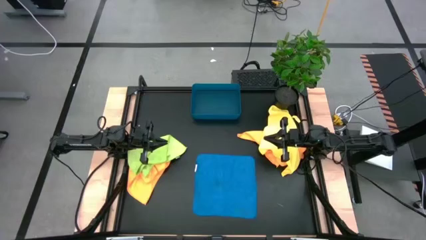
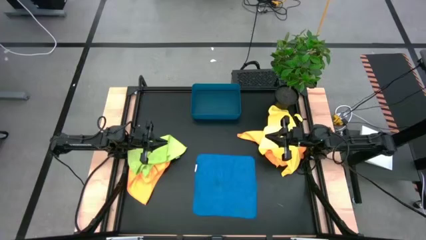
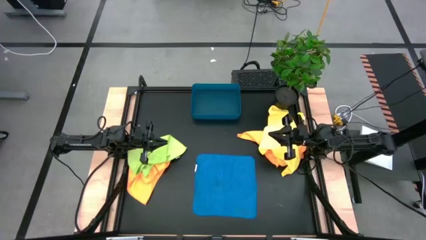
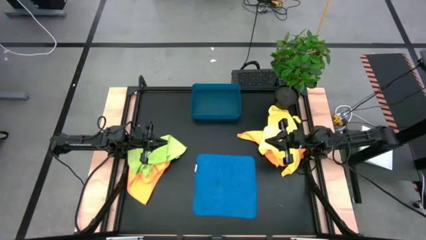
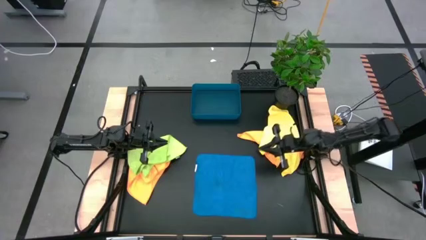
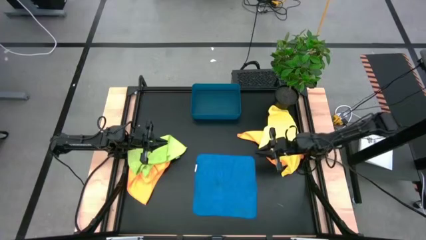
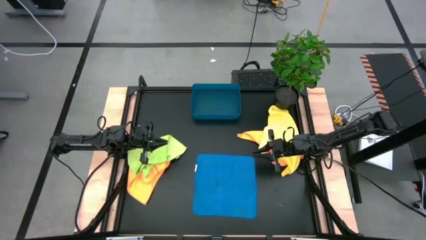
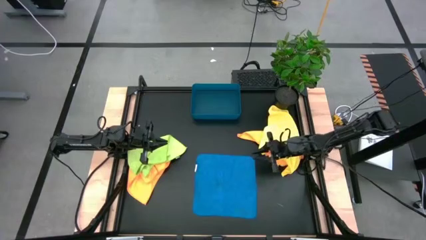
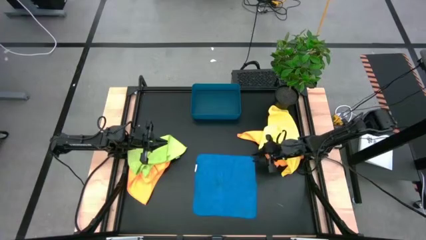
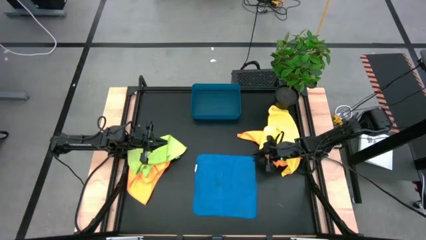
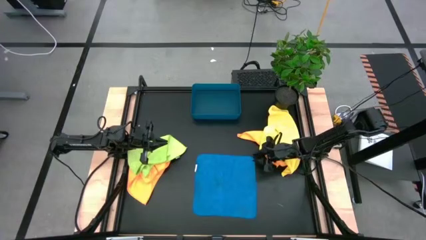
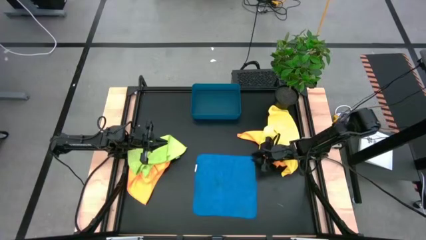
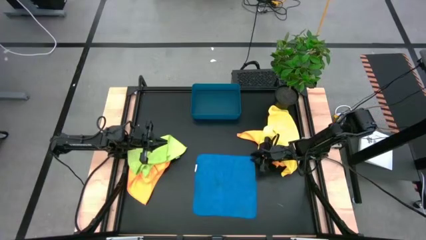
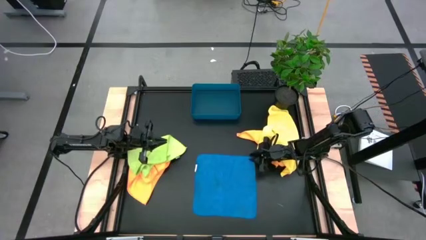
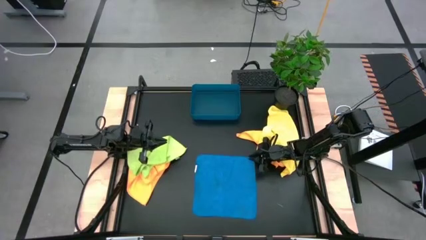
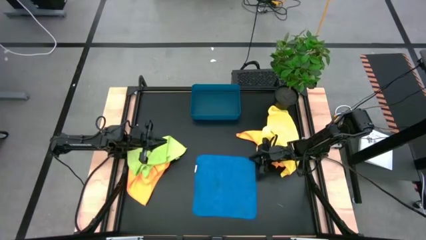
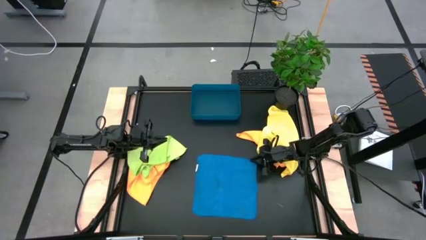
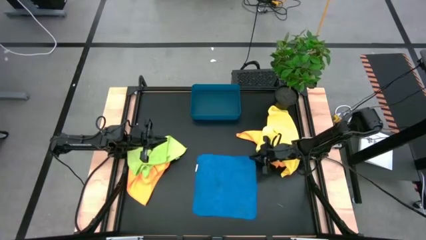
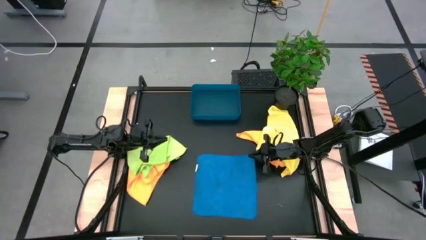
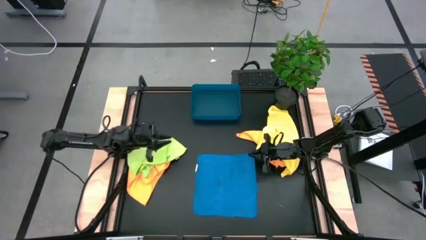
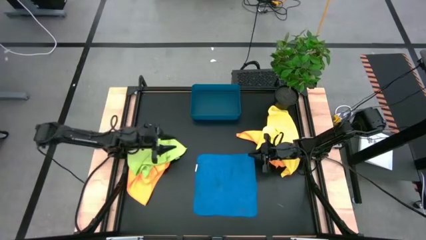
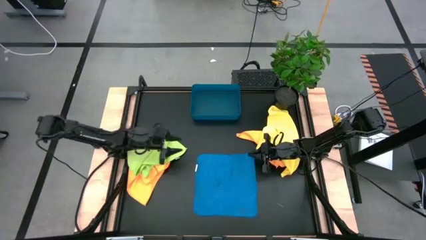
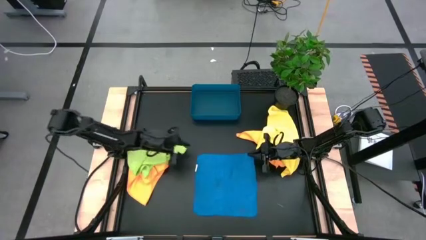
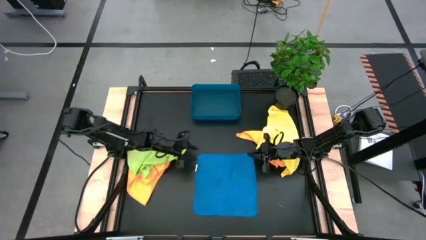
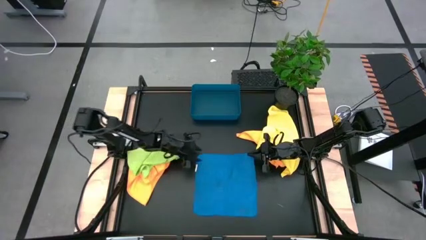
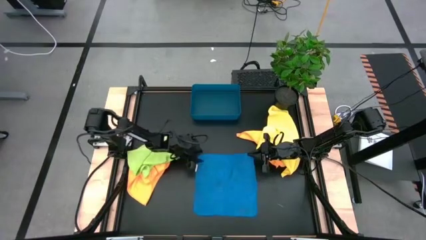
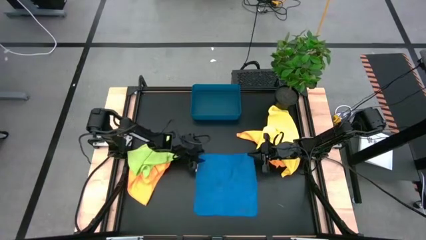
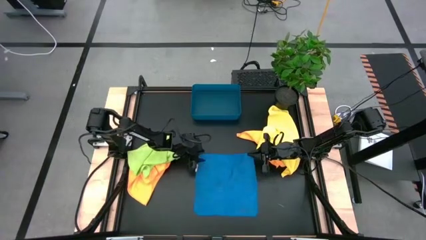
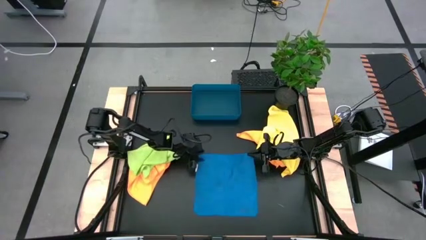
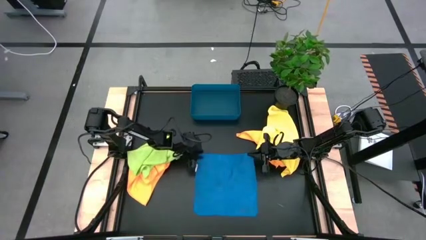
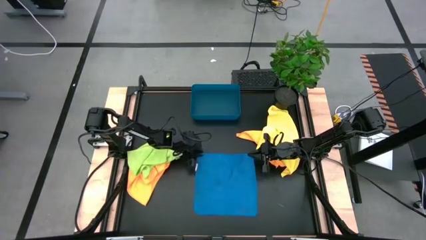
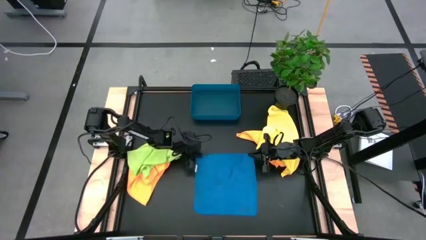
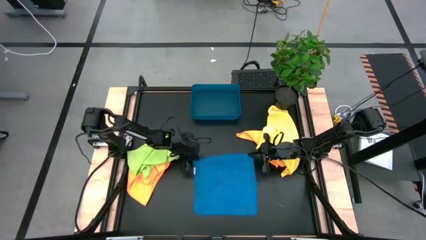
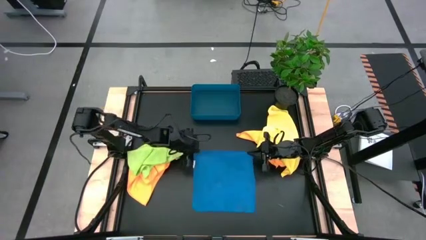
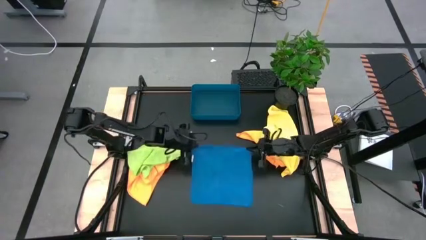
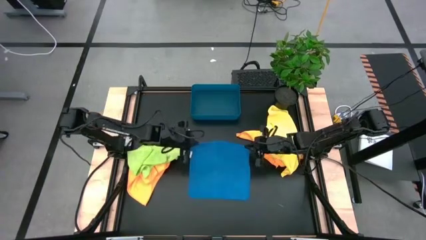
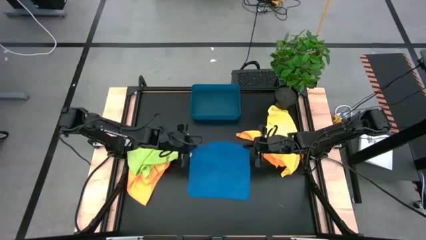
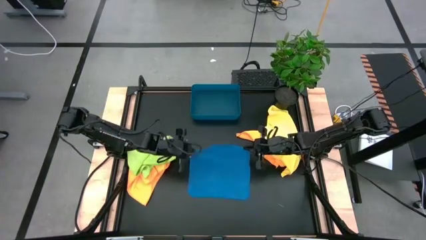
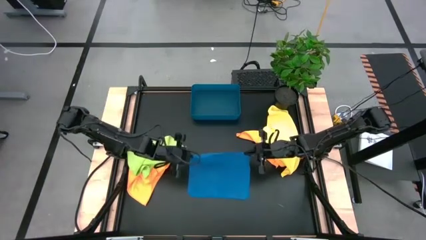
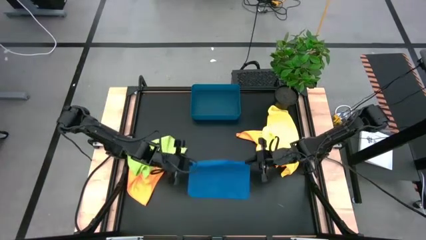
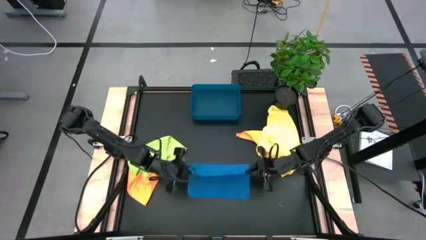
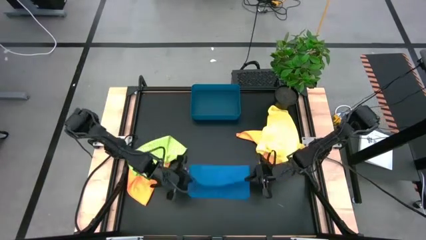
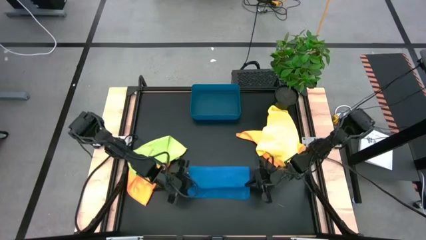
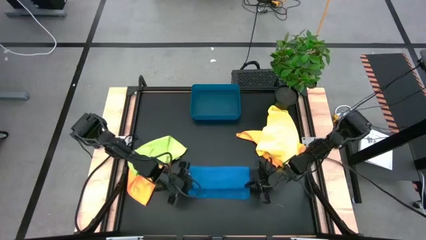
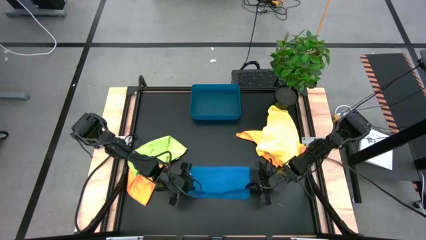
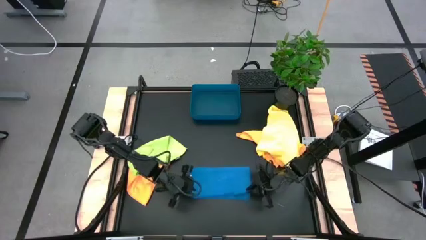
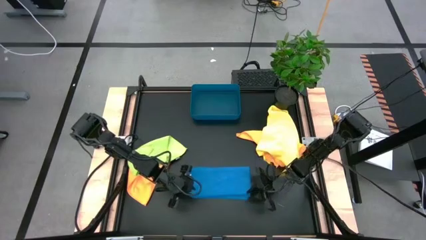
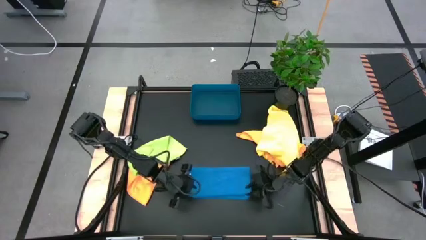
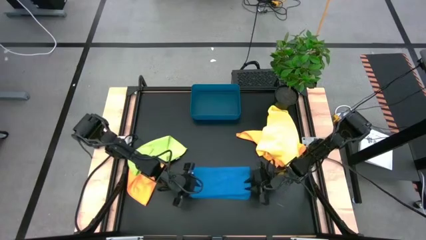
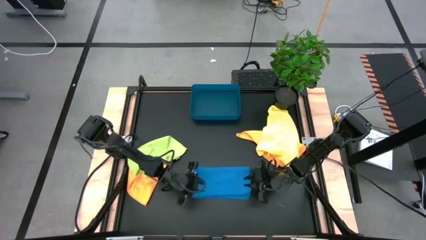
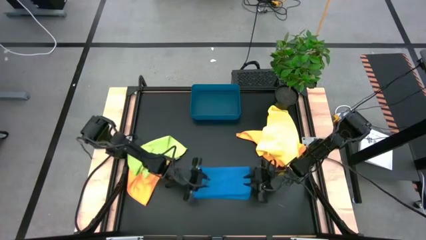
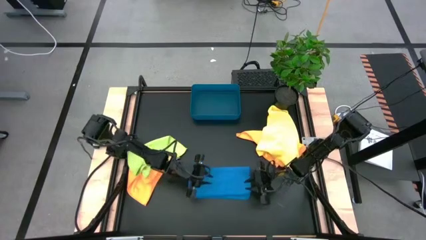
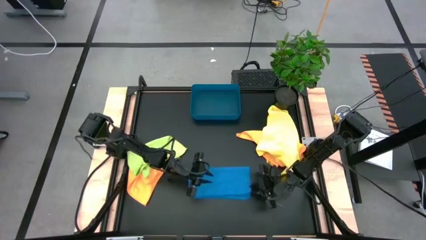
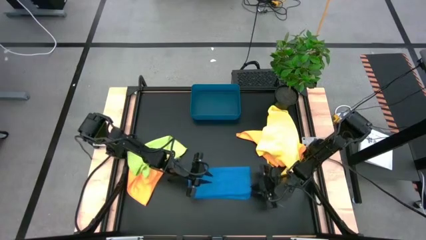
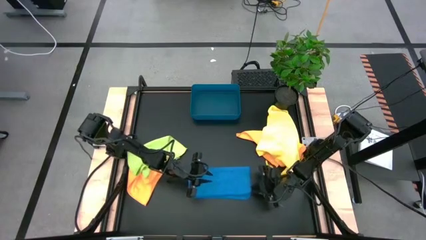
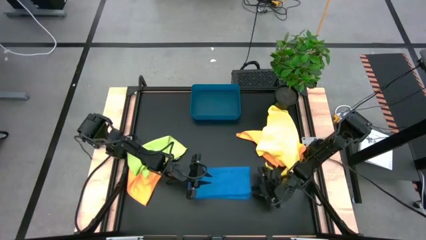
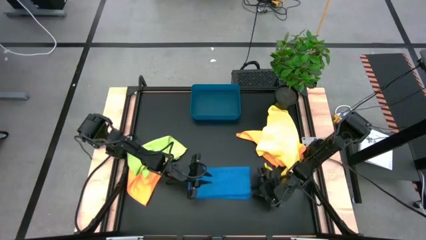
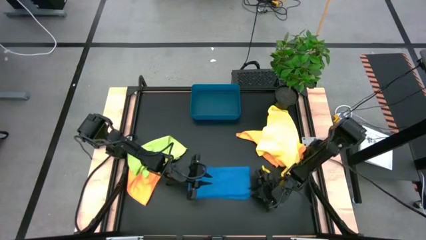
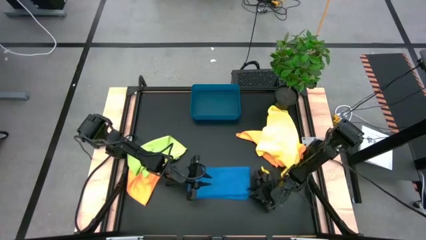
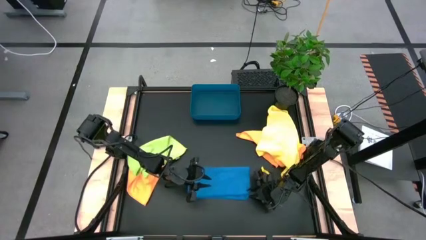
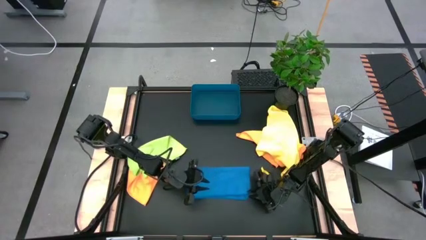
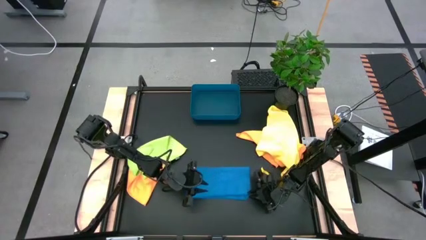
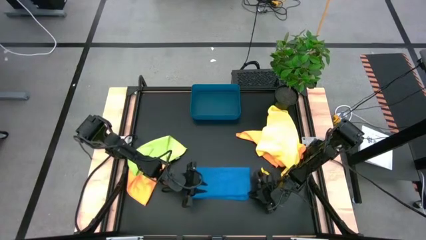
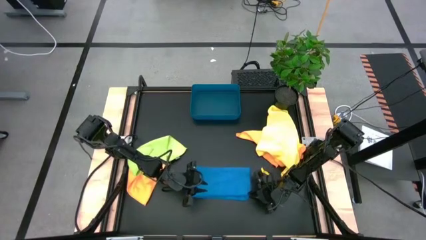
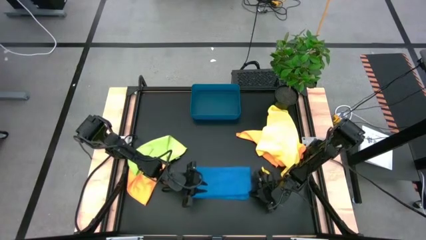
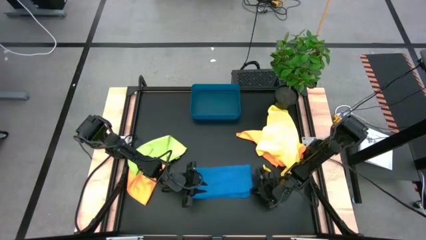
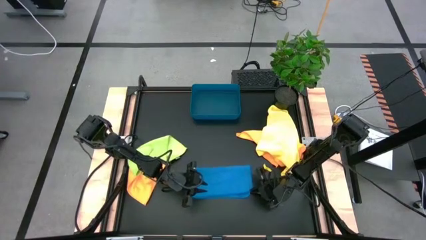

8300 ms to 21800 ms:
Task: Fold microfiber towels
Fold the blue microfiber cloth
